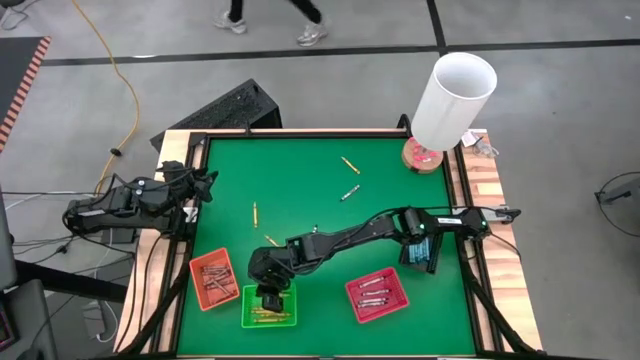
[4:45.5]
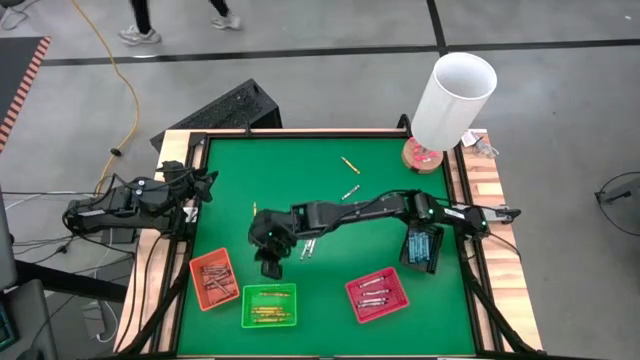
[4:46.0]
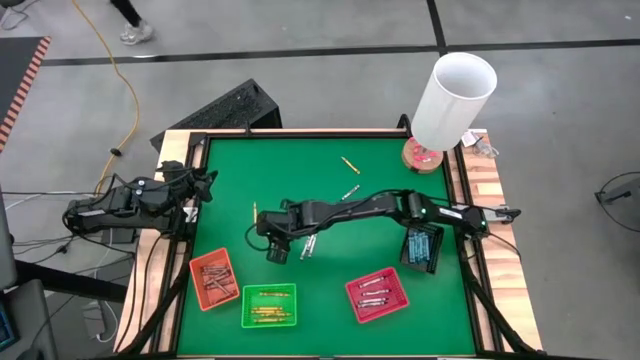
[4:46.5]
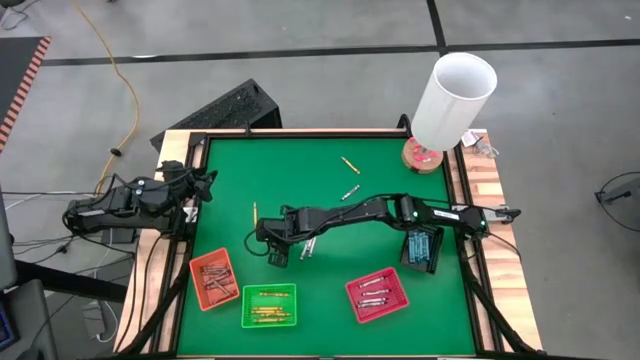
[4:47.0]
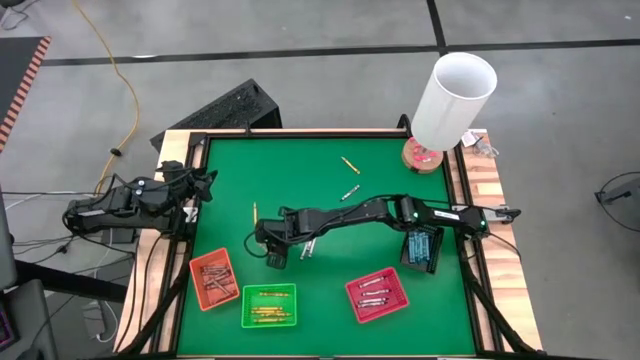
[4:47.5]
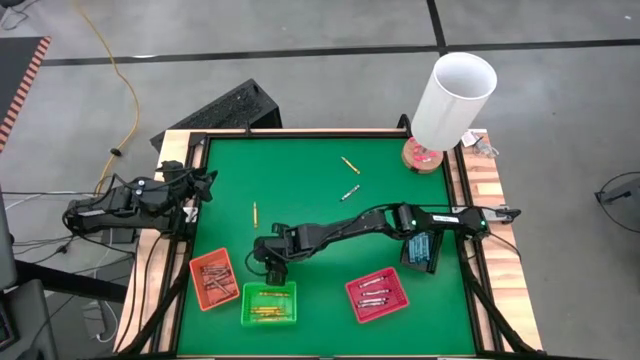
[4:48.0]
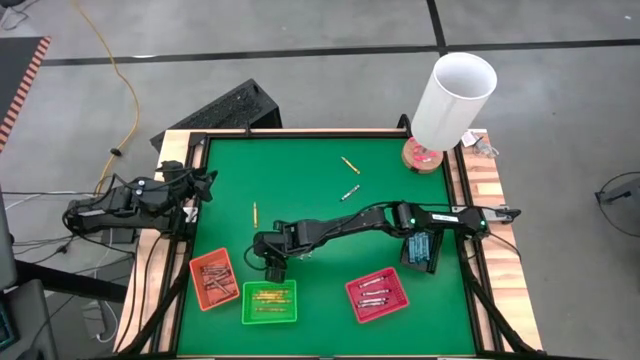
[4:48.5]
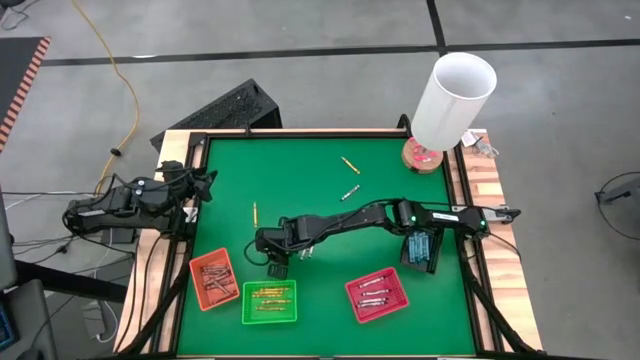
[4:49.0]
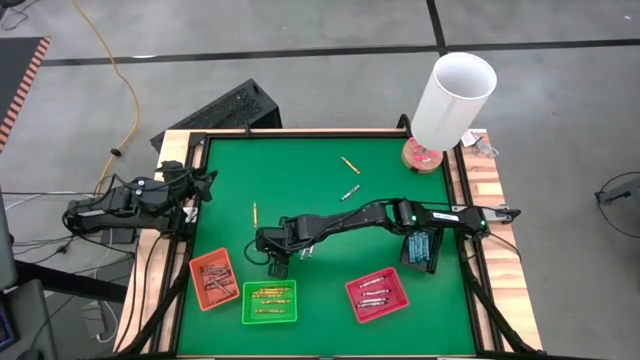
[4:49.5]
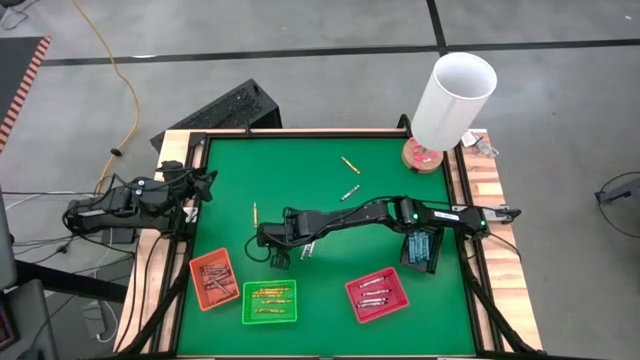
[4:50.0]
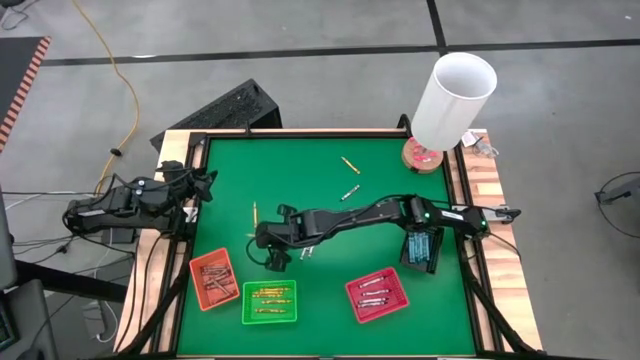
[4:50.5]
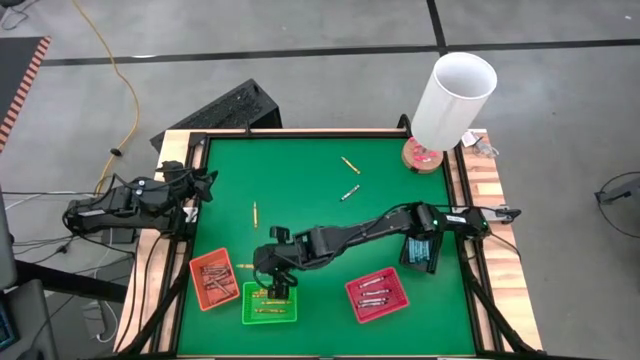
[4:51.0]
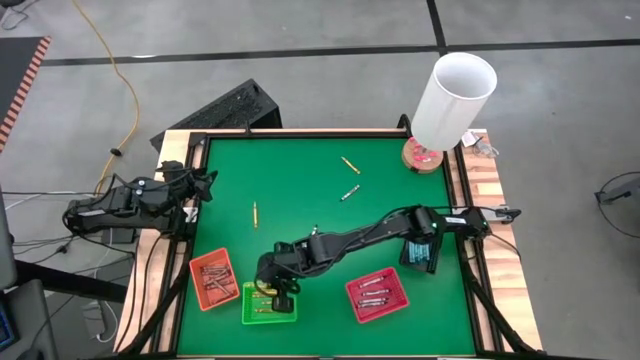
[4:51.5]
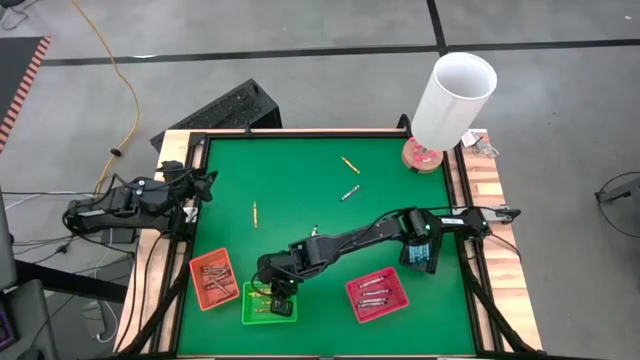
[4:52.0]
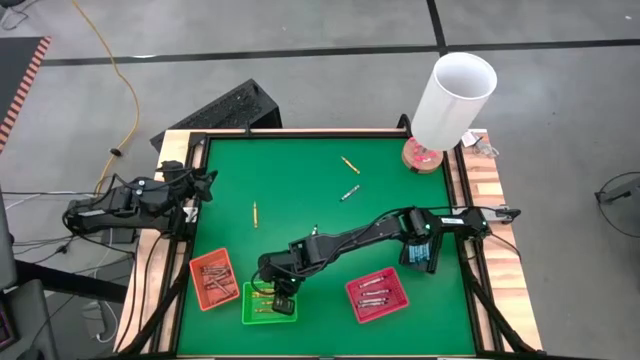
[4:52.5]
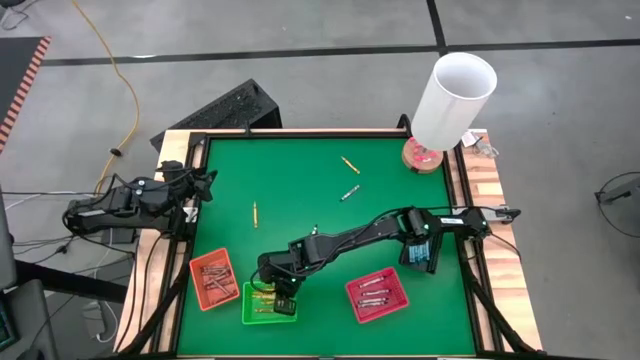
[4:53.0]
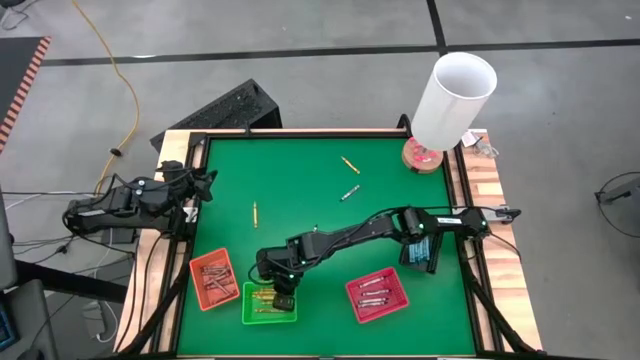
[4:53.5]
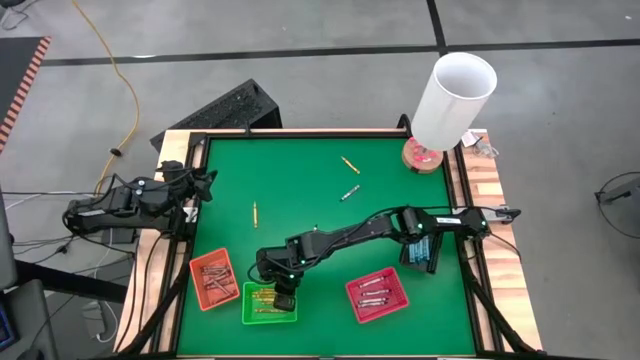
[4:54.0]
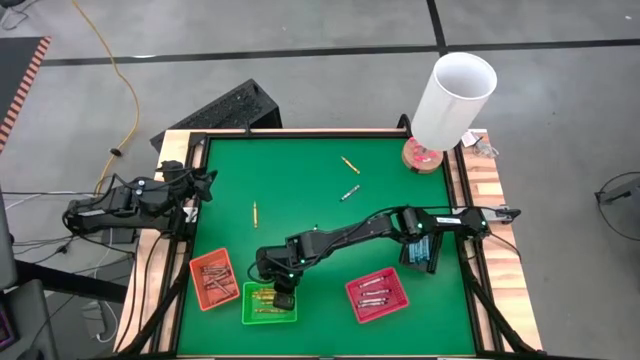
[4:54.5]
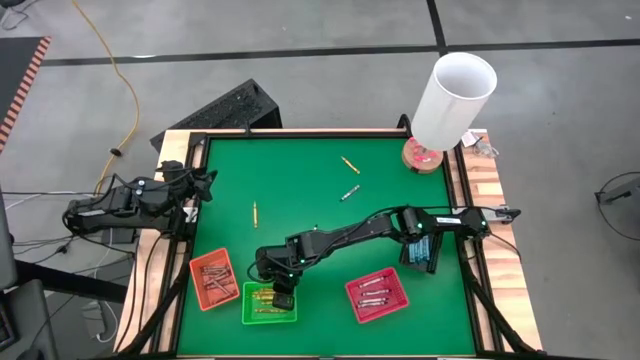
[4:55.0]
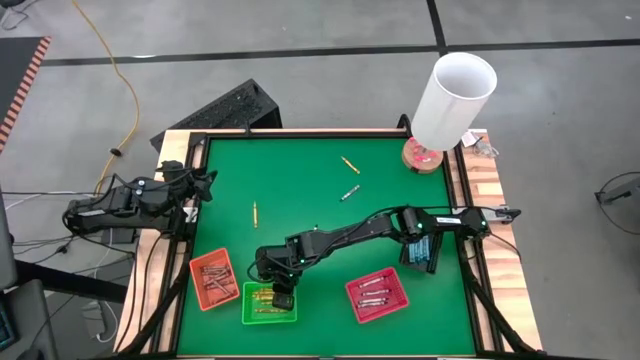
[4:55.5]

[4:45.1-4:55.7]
Task: Sort crayons
Put the yellow crayon into the green bin

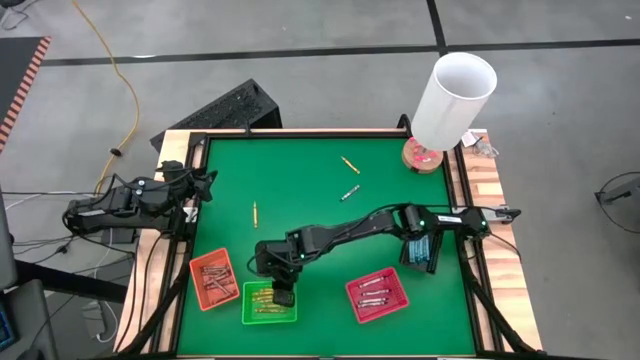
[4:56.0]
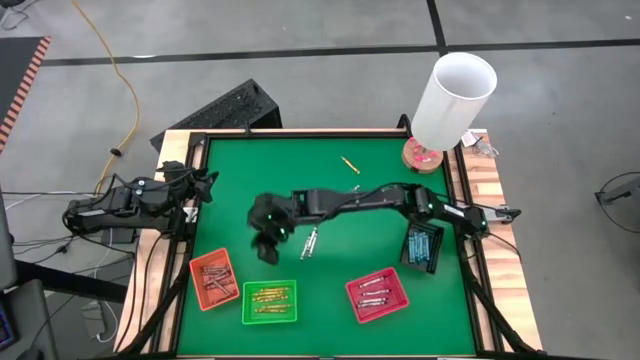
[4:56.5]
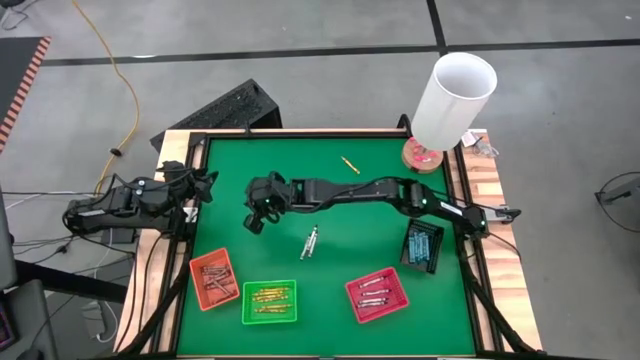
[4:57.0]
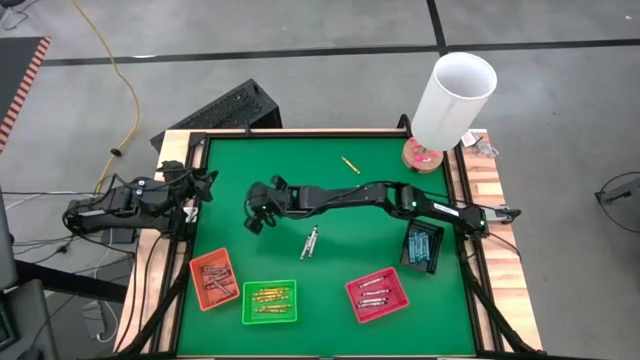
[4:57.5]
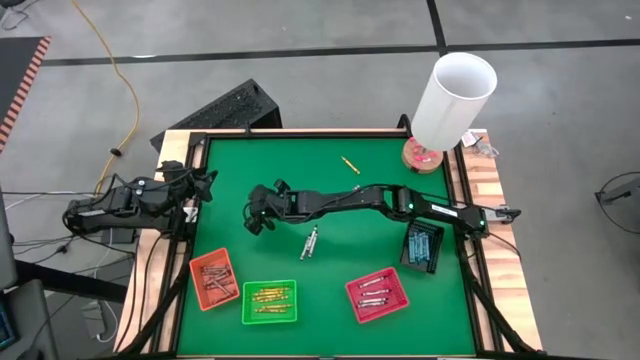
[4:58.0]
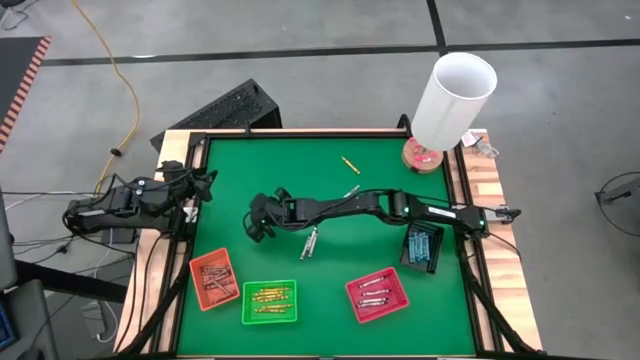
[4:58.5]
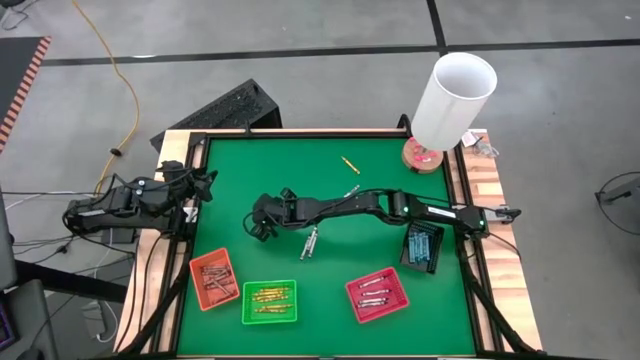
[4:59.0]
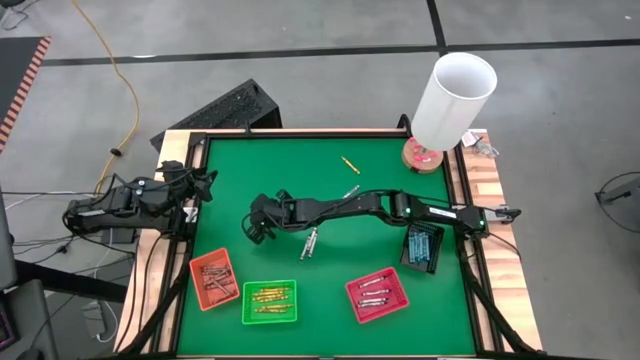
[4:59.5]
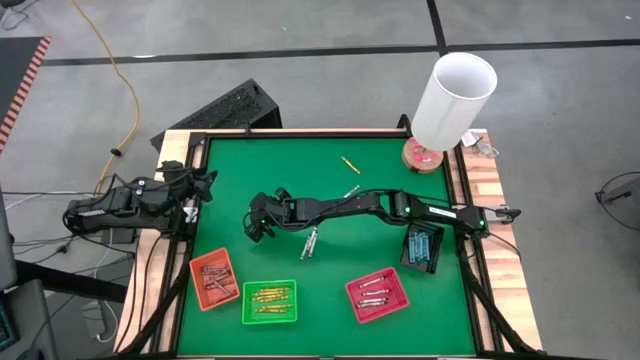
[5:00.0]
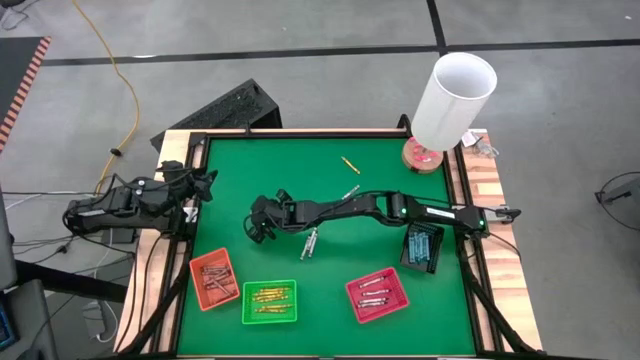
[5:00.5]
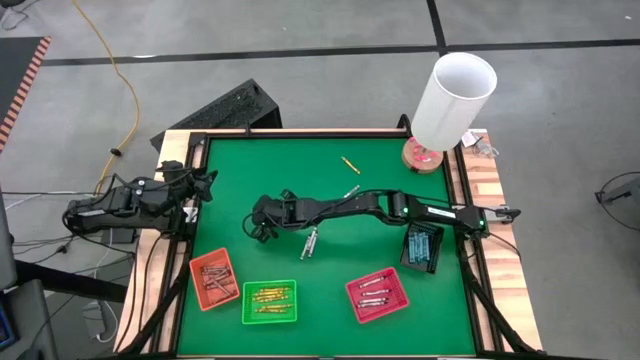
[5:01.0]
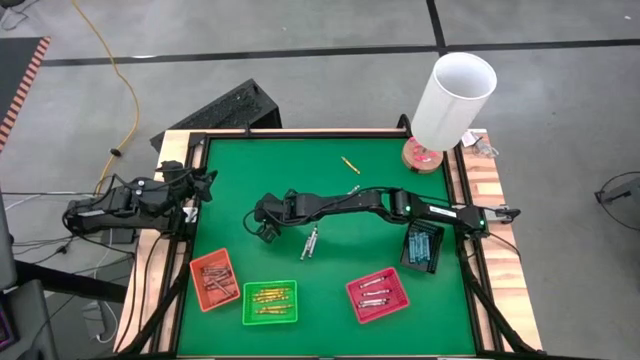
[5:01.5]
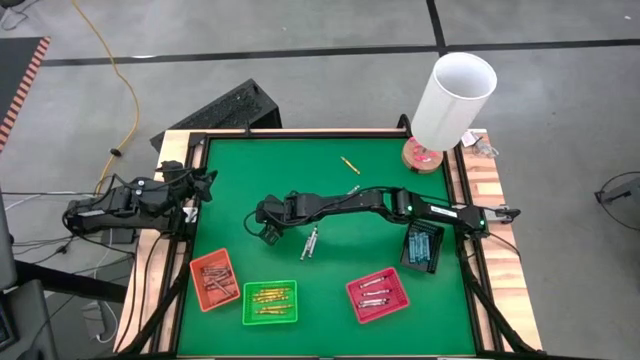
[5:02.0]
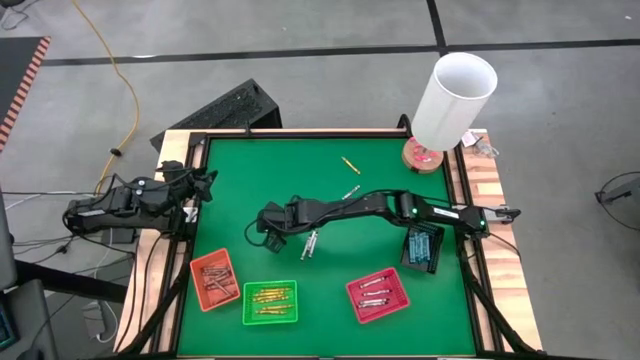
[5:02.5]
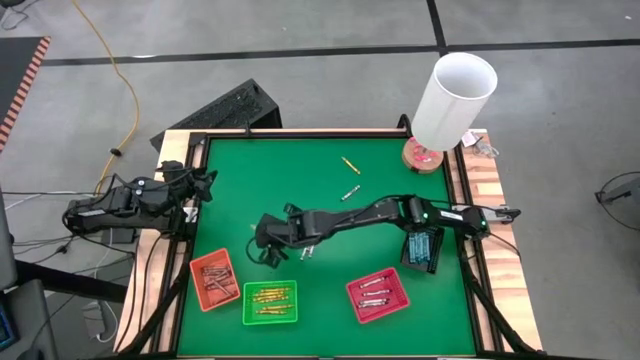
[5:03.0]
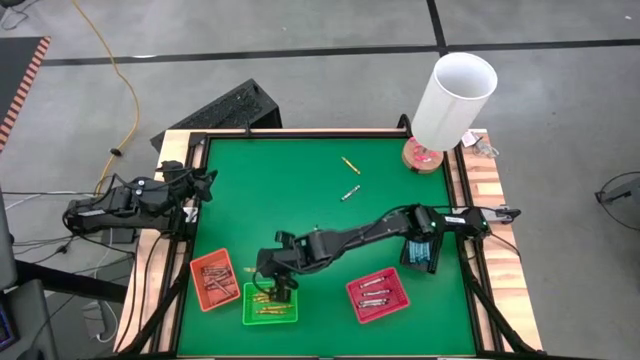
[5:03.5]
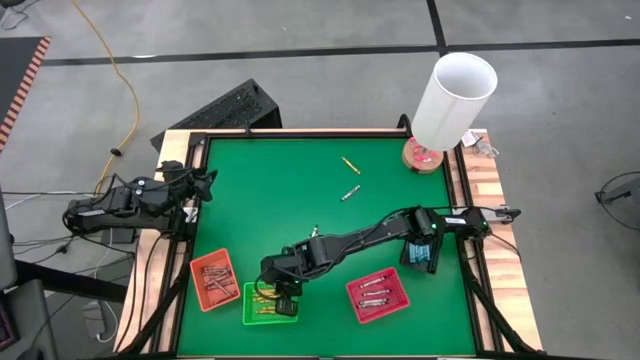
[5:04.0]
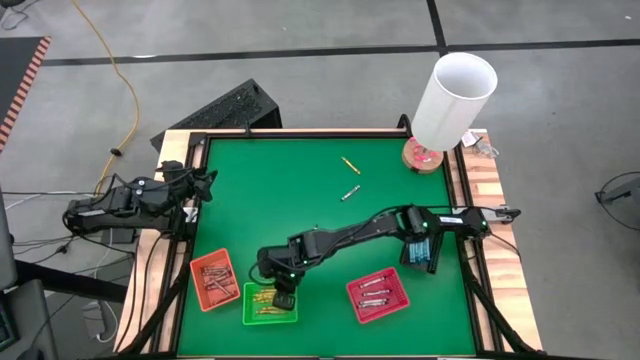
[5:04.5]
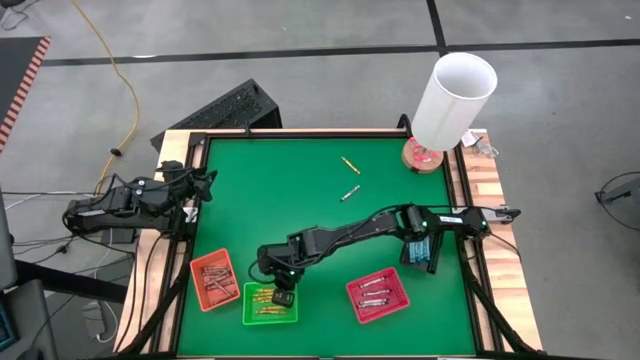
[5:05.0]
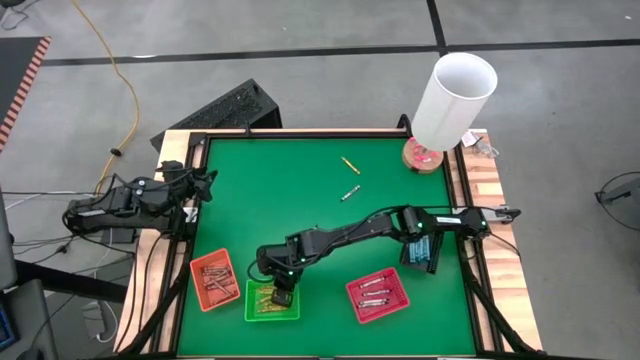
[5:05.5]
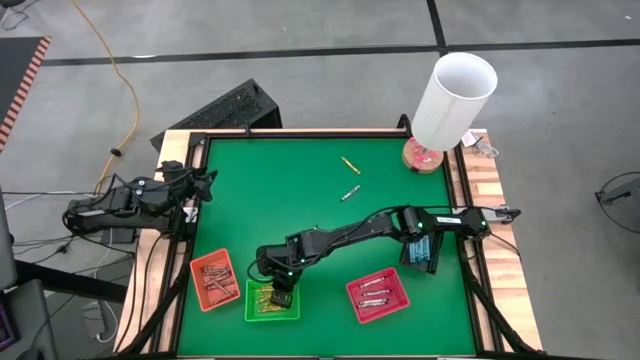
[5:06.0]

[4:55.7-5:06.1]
Put the yellow crayon into the green bin
